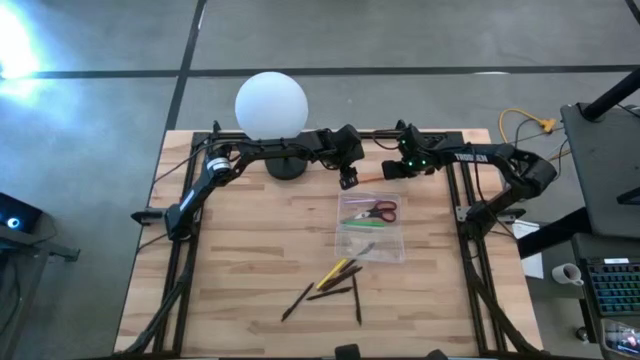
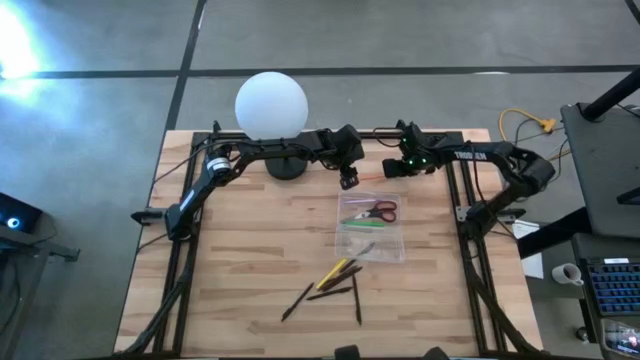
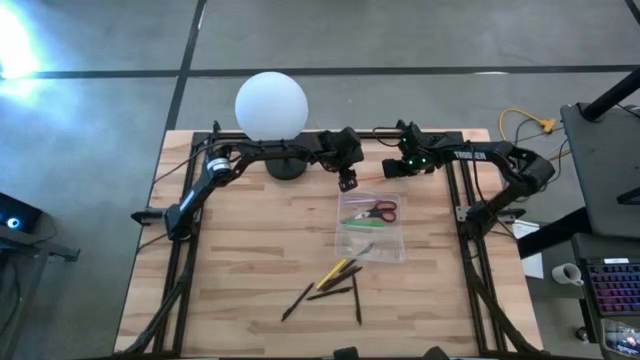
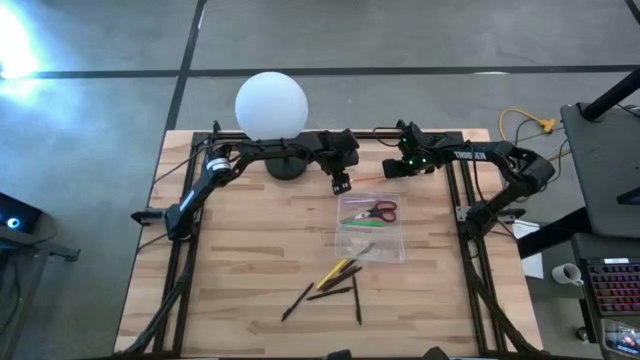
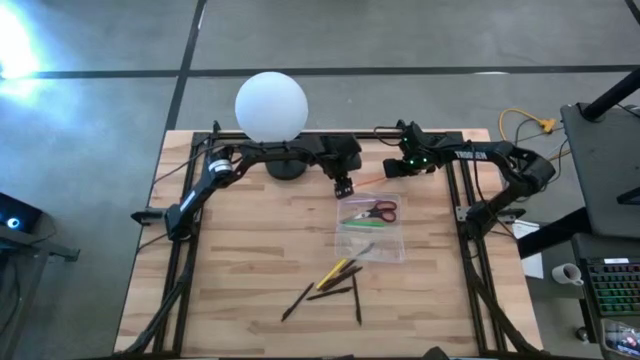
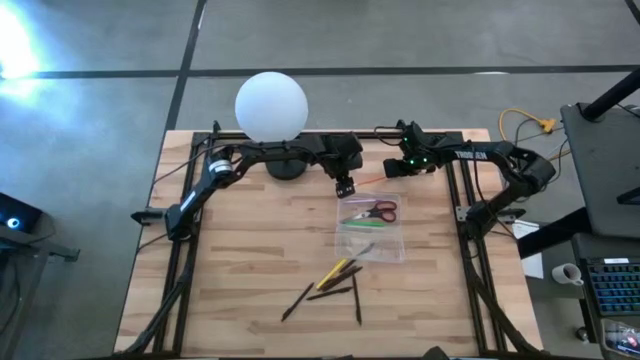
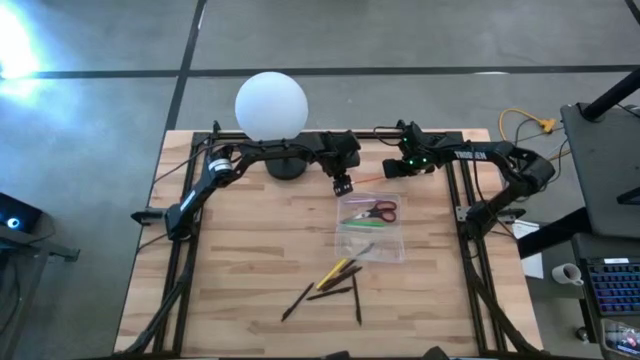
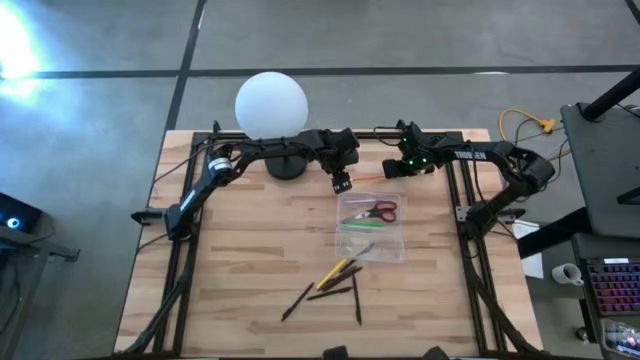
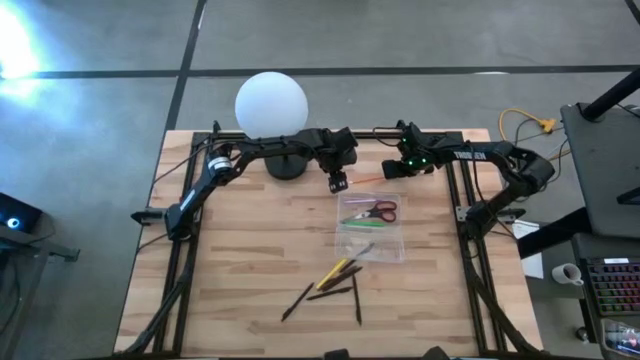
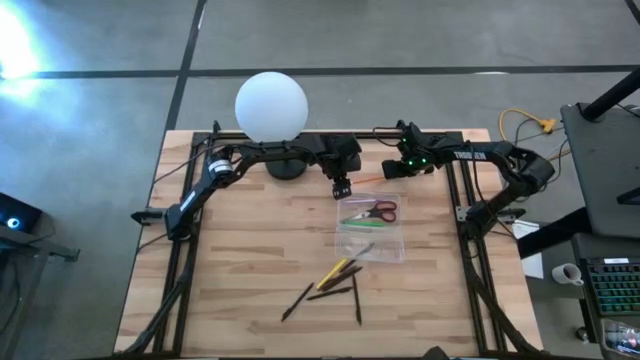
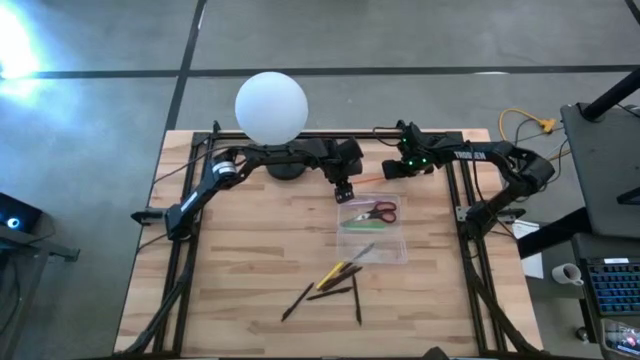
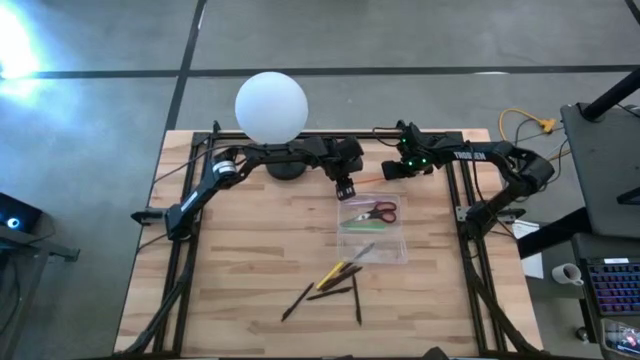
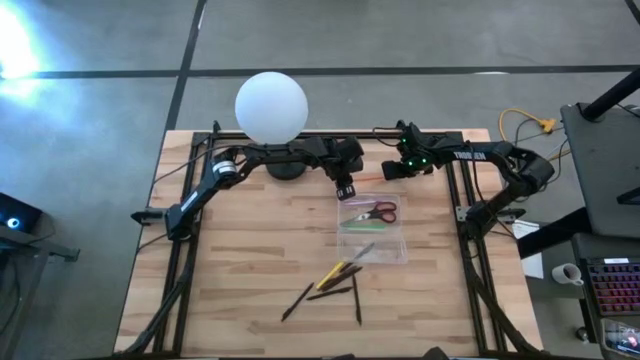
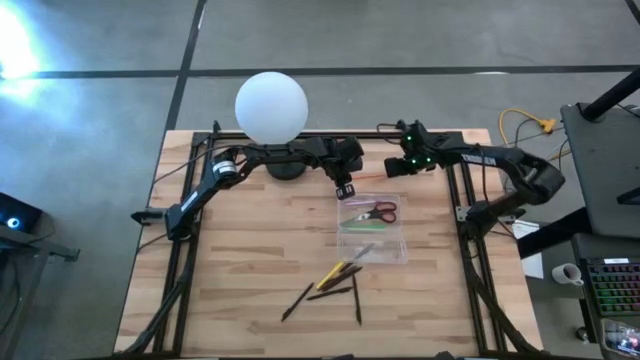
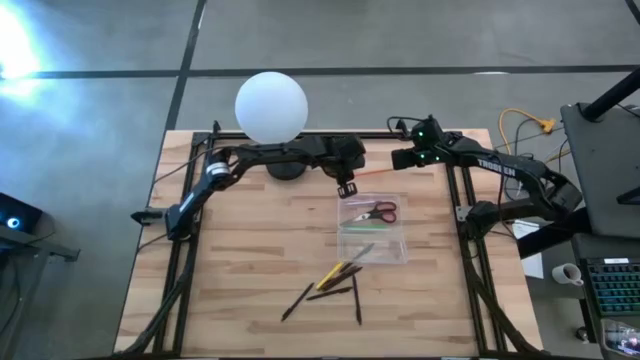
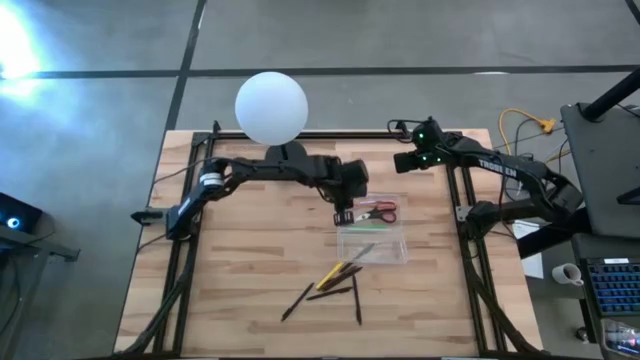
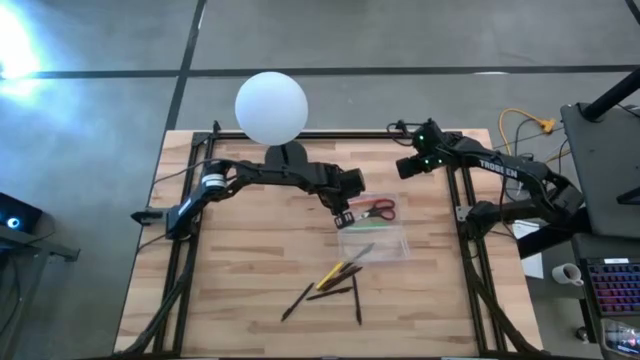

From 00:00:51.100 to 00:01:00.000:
Task: Pick & place school supplies into a supply box
Put the orange pencil into the supply box

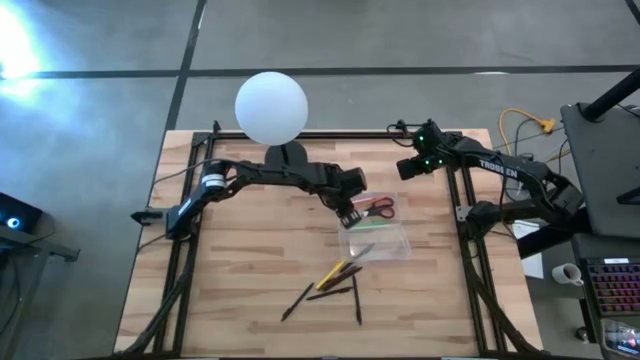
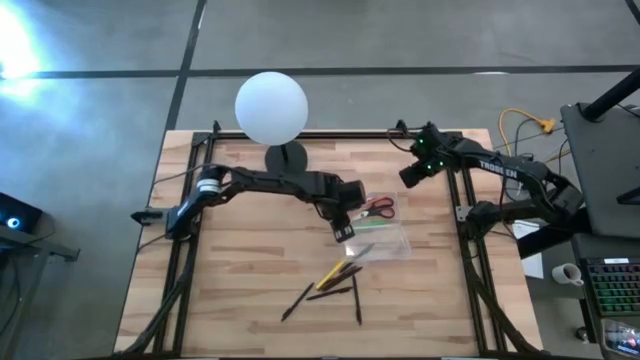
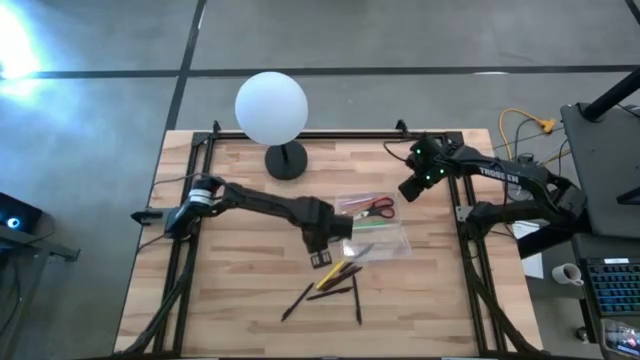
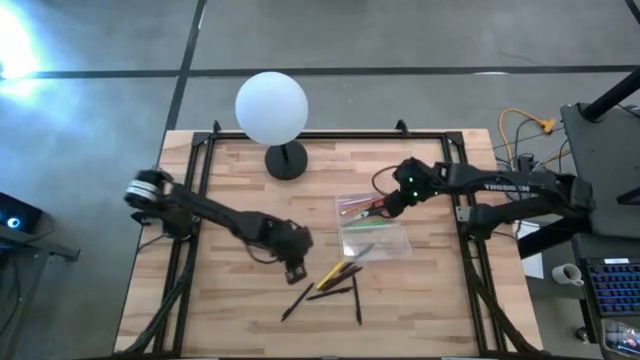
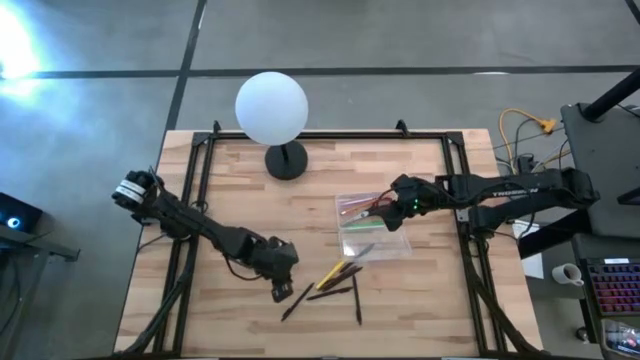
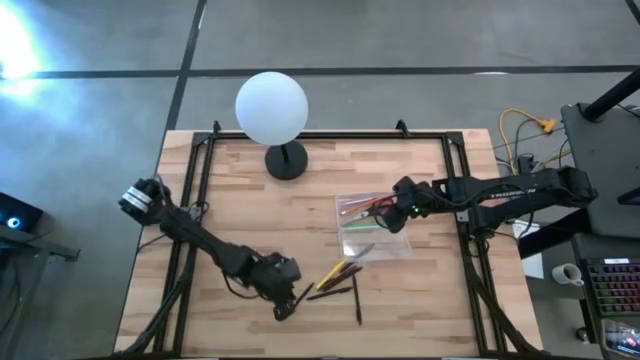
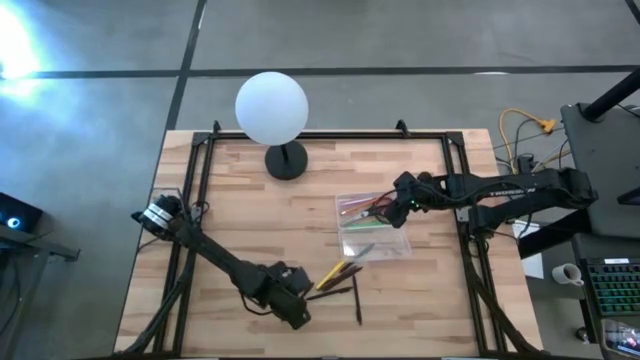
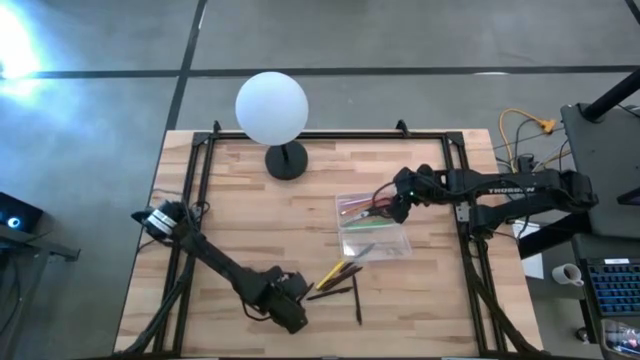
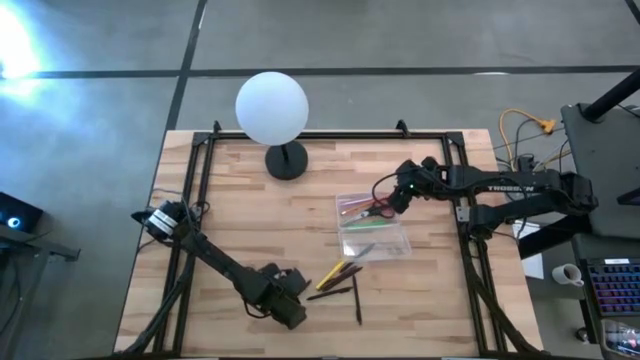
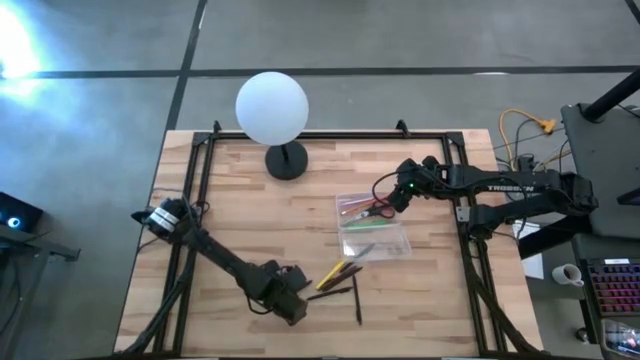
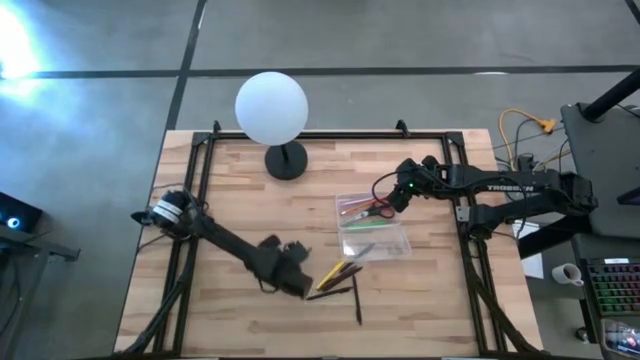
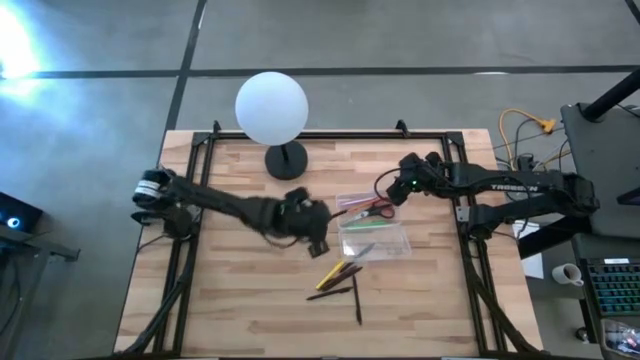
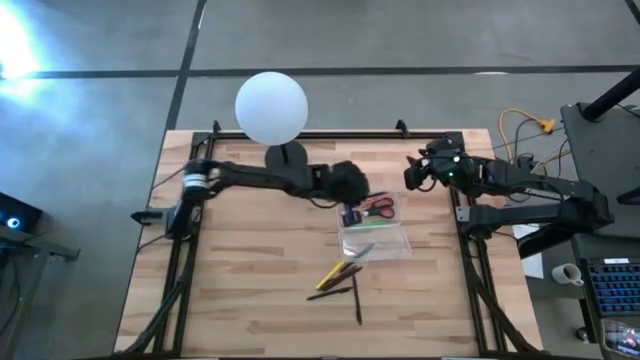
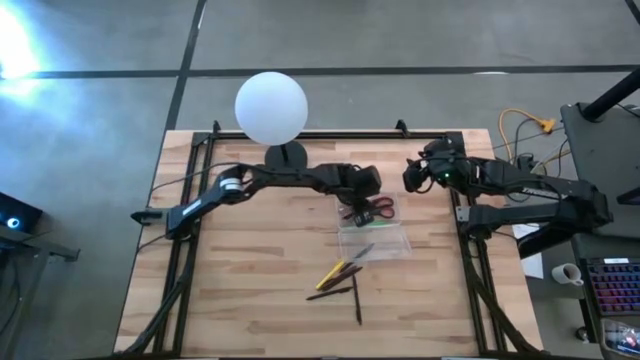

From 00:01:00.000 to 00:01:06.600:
Put the black ballpen into the supply box
